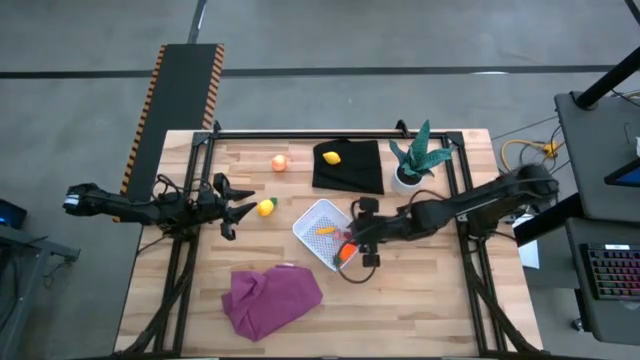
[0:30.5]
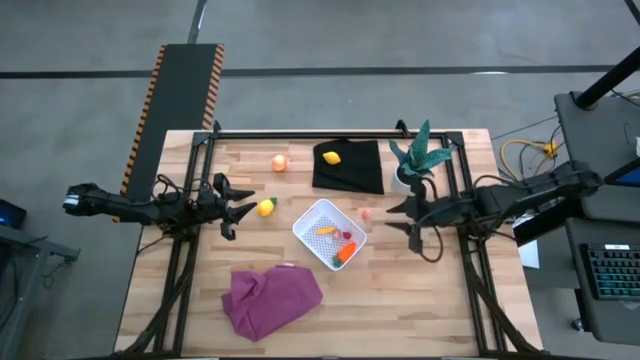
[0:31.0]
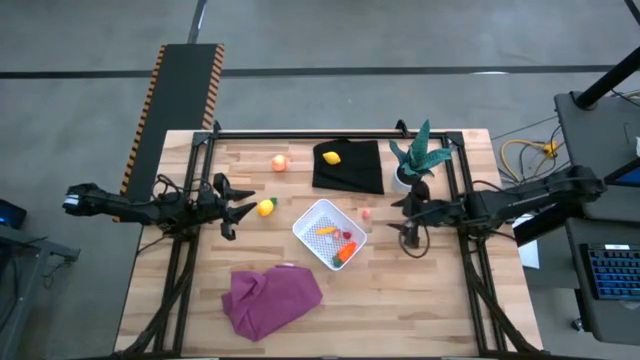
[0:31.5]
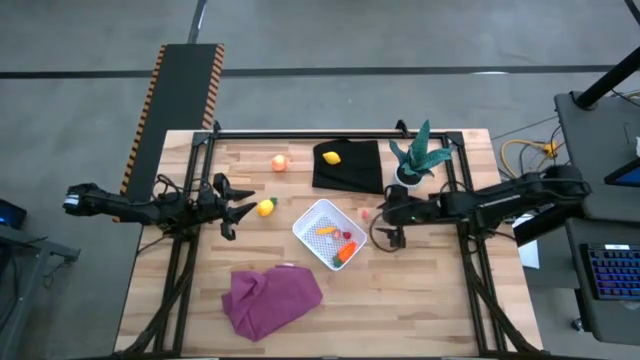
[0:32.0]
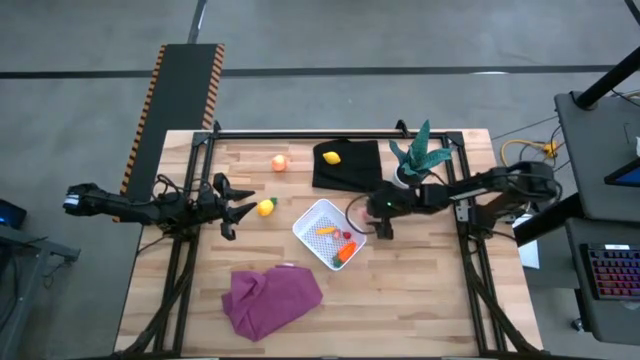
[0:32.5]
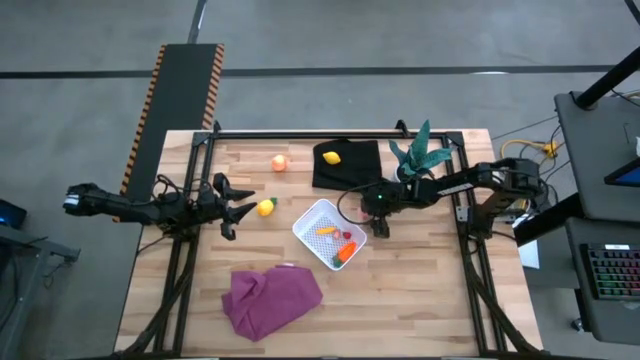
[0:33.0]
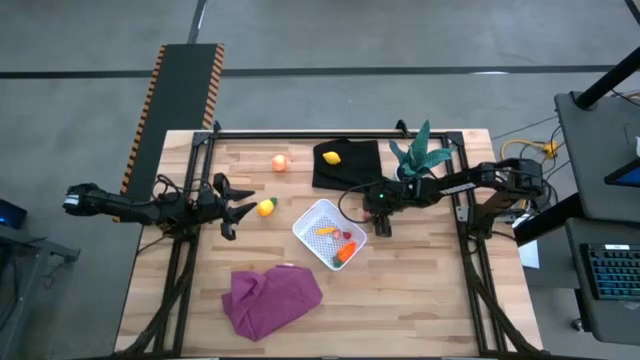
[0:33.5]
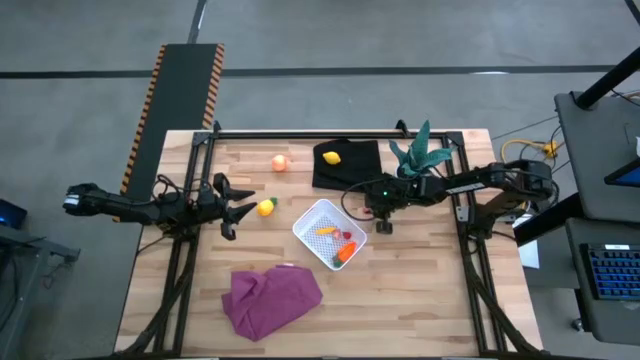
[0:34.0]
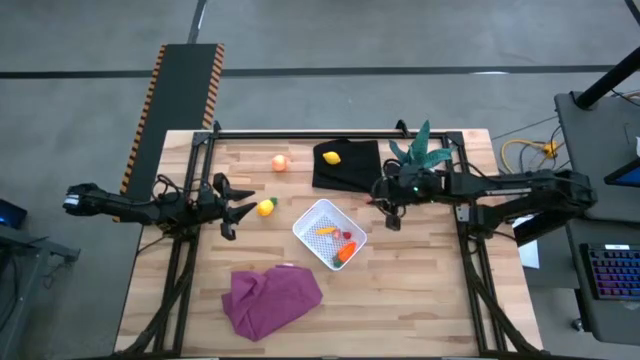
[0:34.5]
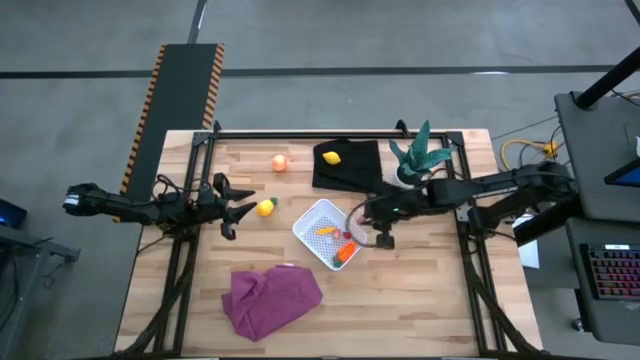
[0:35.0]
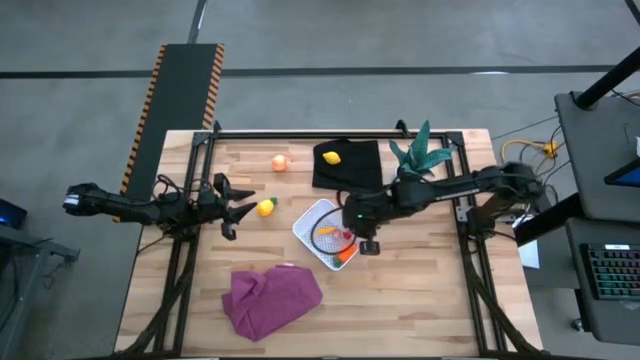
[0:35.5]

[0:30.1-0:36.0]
Task: Pick and placing Produce into tupperware
Put the small peach into the white bin

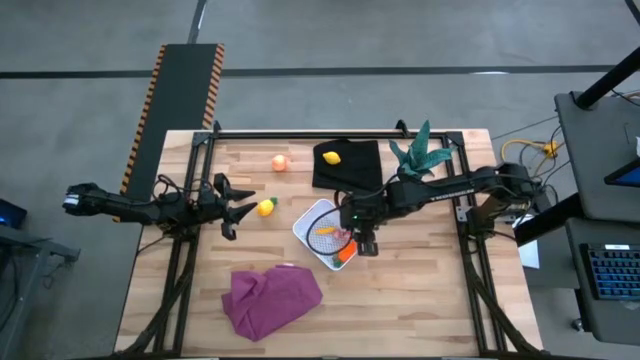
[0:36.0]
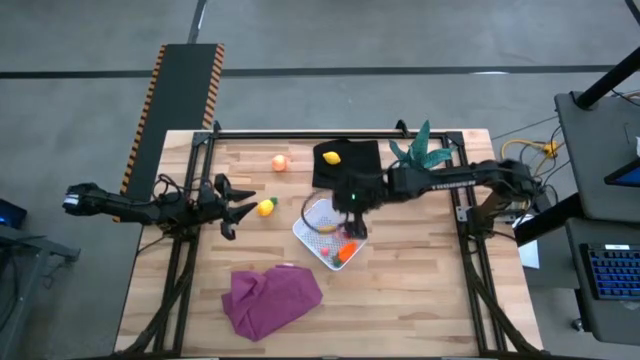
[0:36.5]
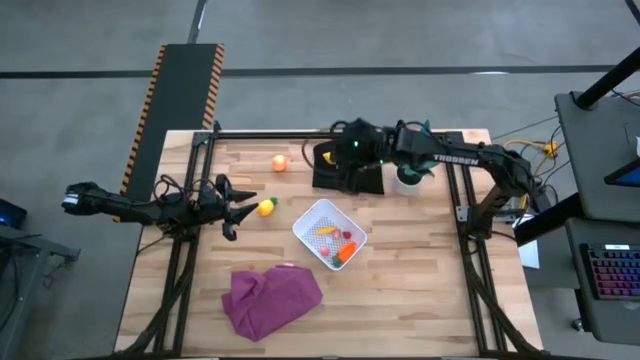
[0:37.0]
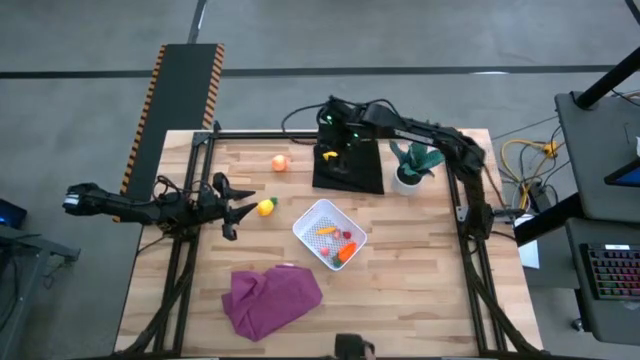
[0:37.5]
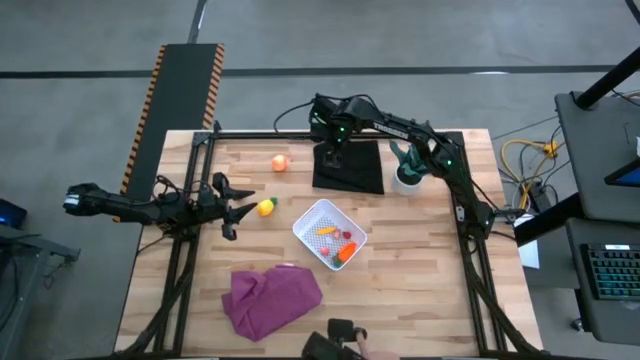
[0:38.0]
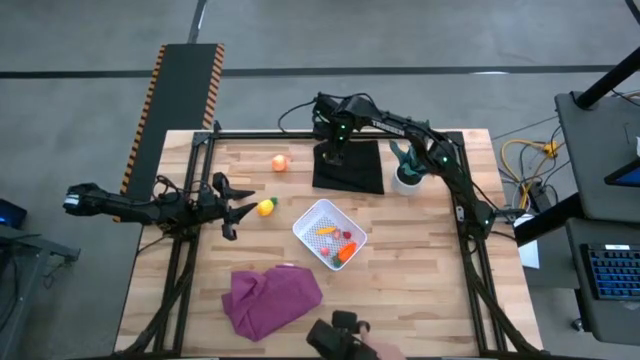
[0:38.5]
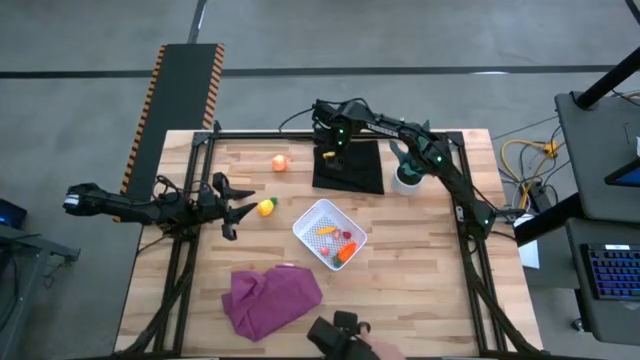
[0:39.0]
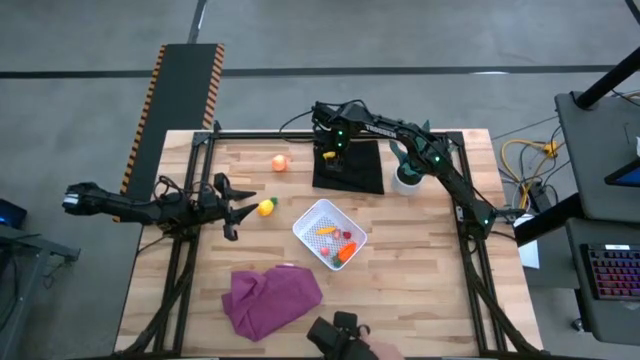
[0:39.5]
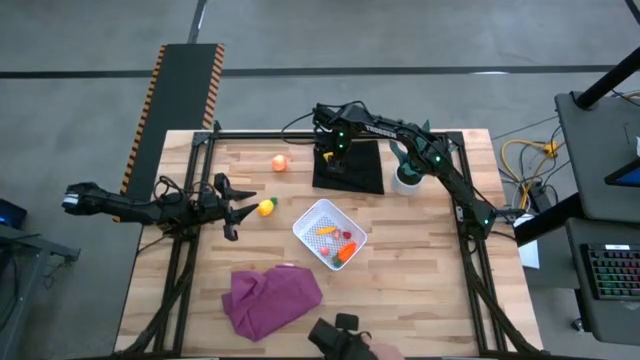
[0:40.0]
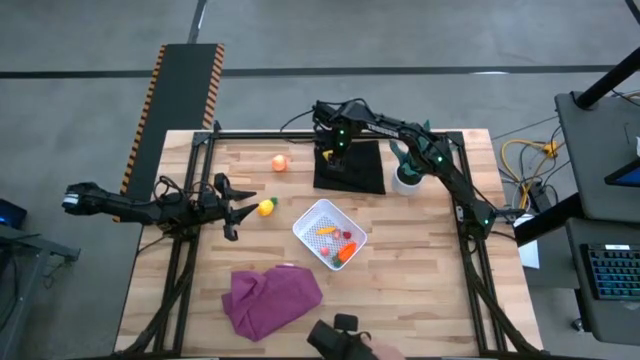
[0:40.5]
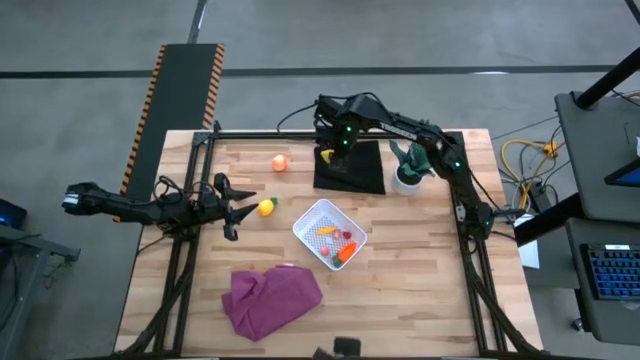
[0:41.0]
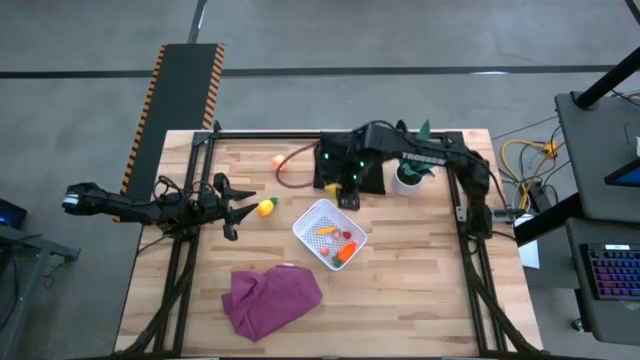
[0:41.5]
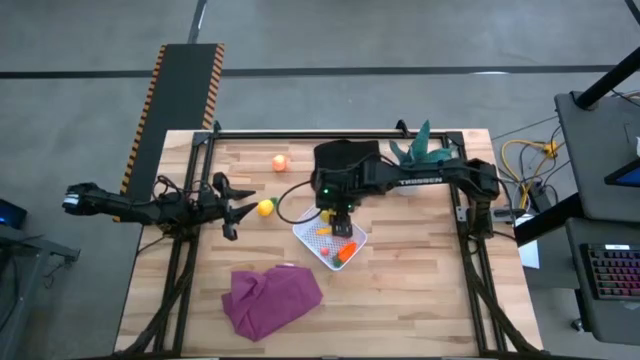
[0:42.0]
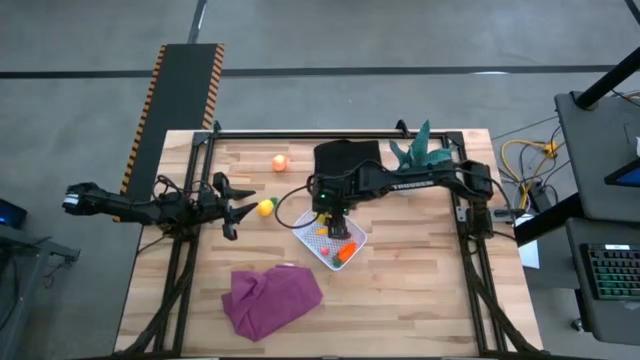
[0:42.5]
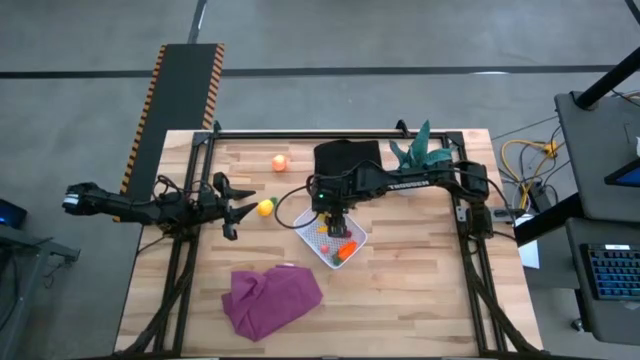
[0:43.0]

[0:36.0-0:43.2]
Put the lemon into the white bin

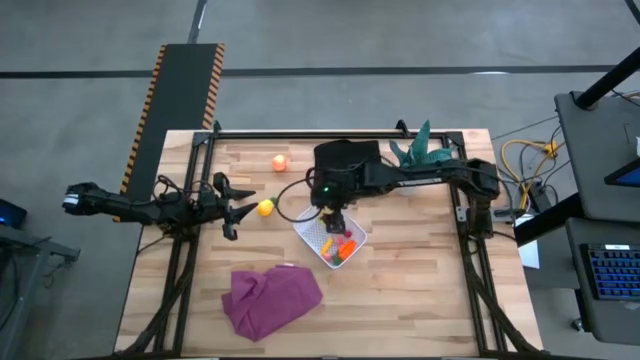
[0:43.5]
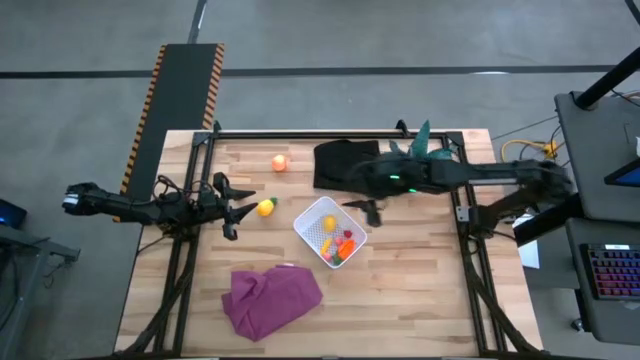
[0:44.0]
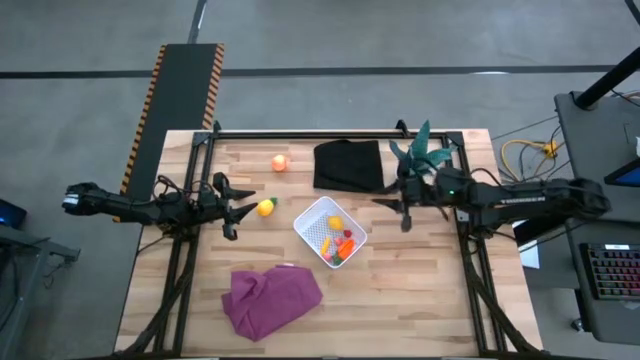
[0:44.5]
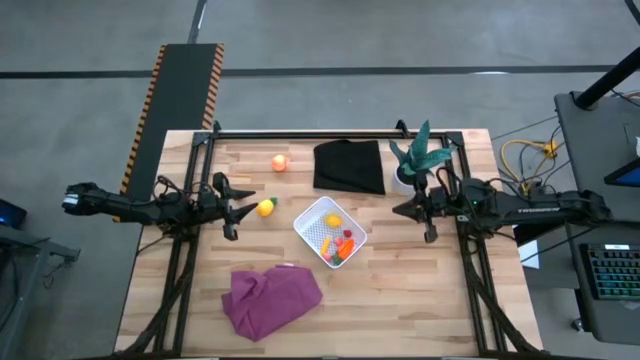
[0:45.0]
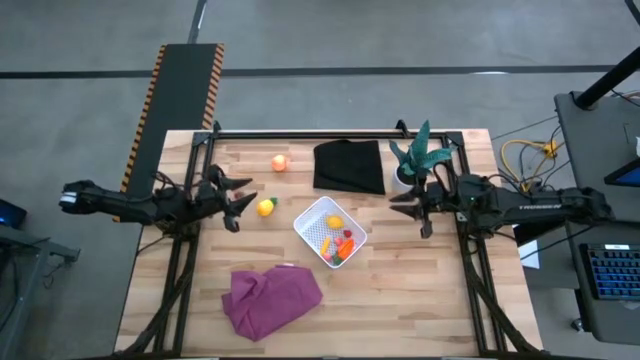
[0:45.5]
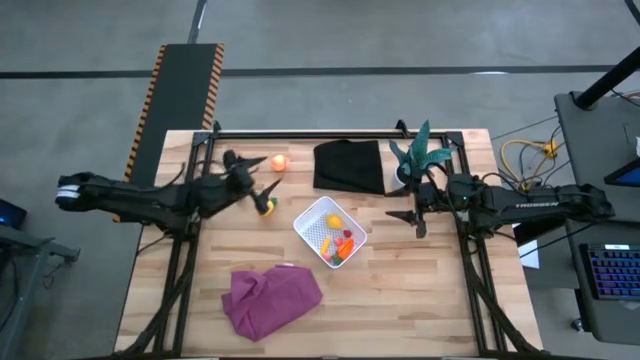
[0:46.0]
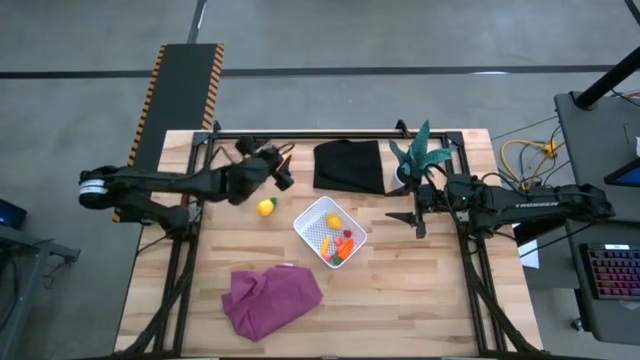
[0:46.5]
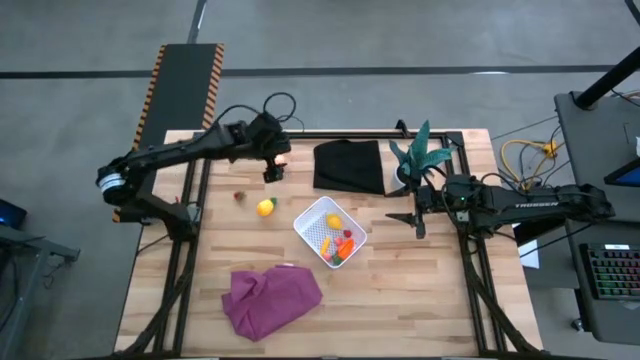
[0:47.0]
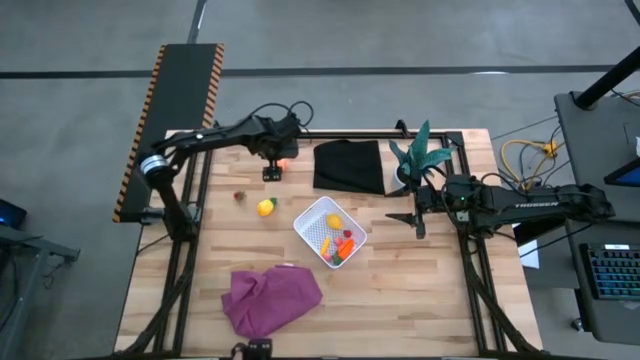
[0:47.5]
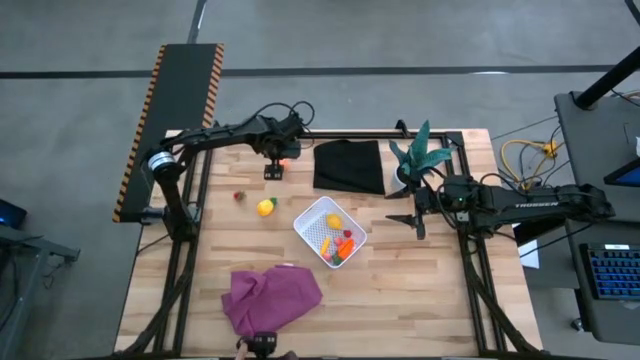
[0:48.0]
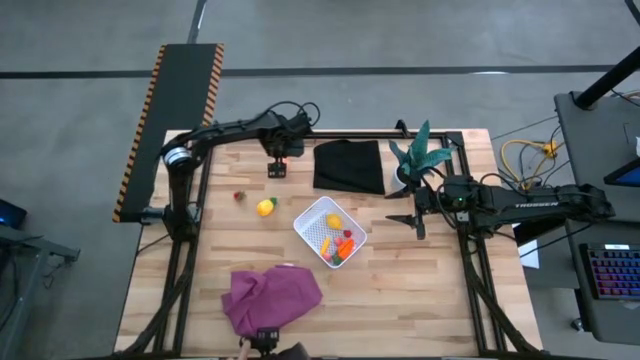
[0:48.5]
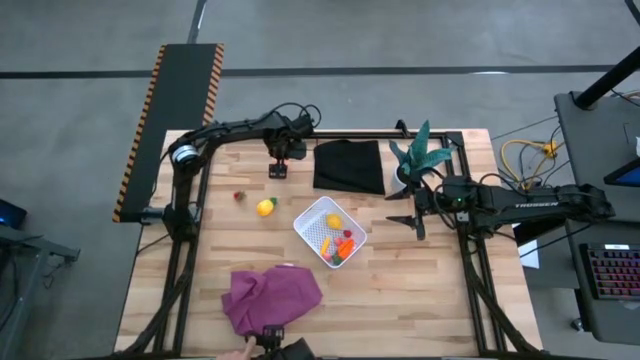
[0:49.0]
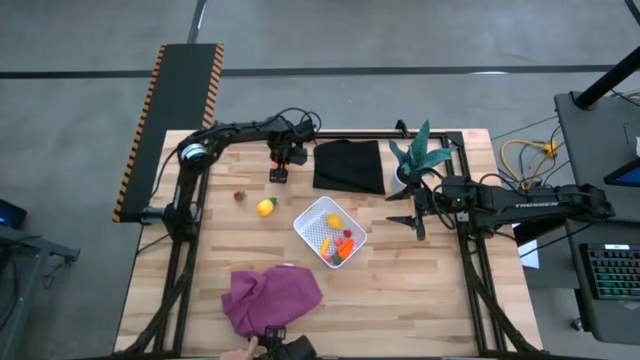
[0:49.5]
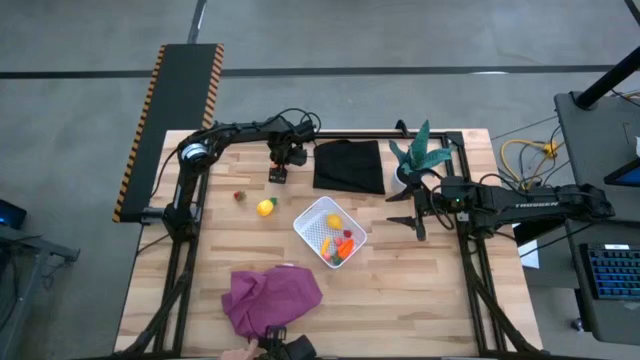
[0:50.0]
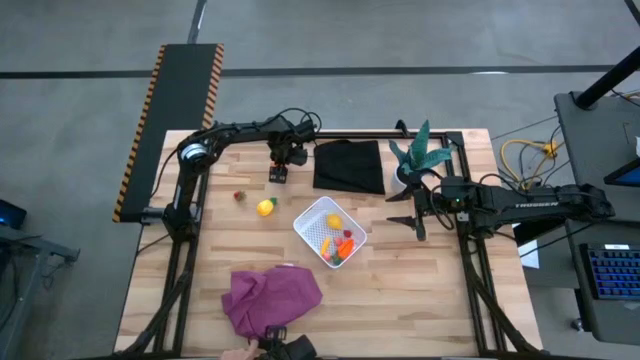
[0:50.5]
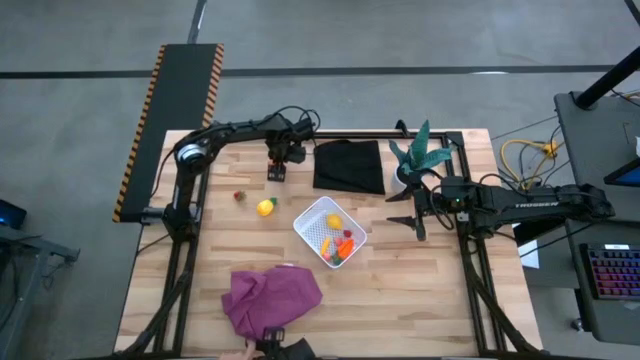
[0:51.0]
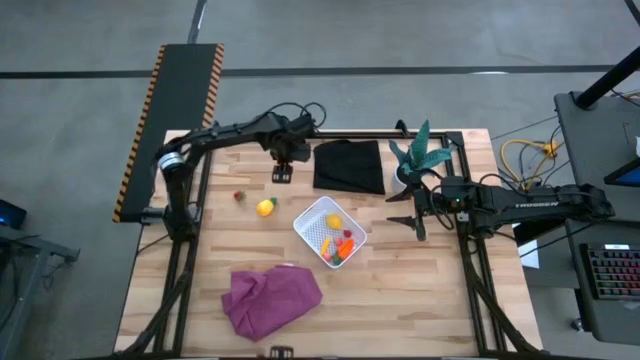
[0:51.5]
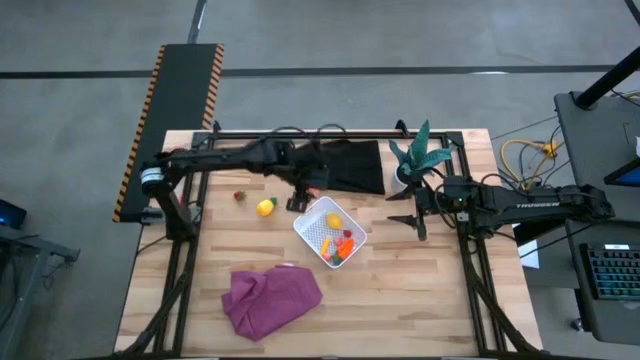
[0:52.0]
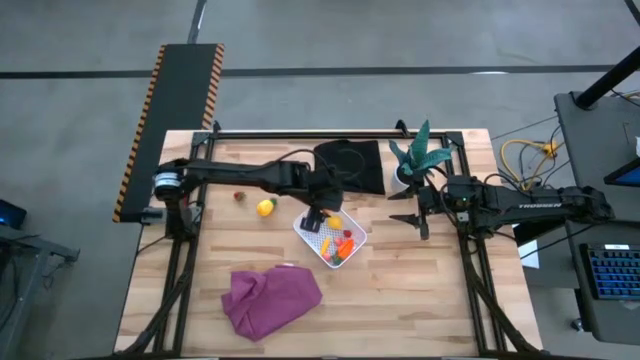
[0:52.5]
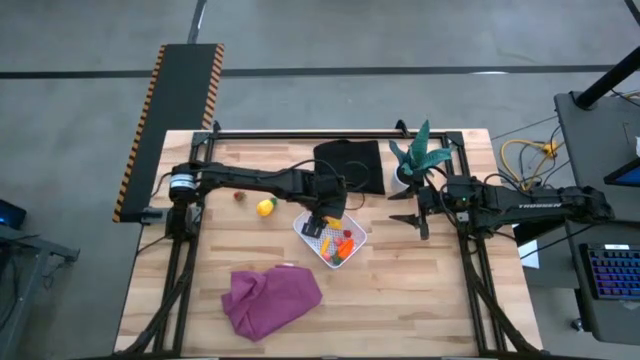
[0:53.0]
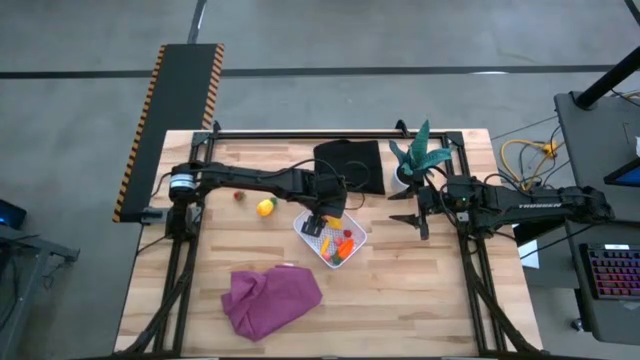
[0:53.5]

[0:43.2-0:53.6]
Put the large peach into the white bin
